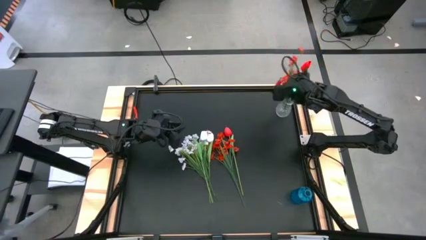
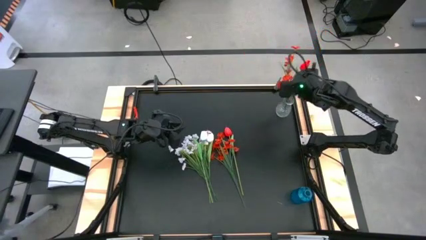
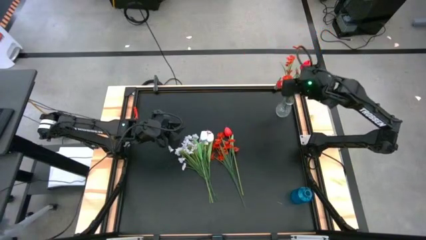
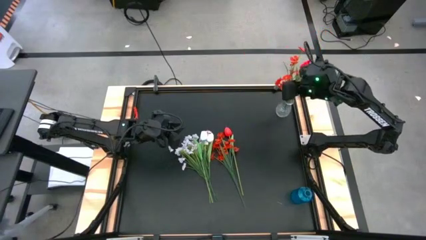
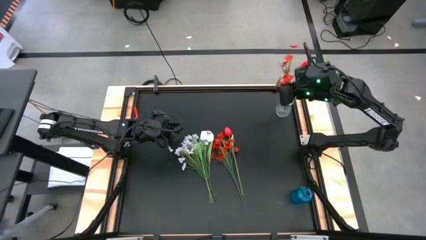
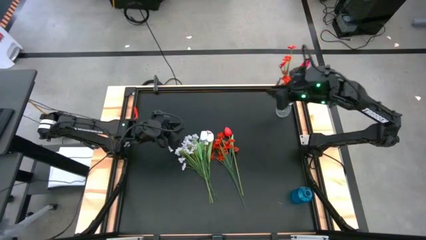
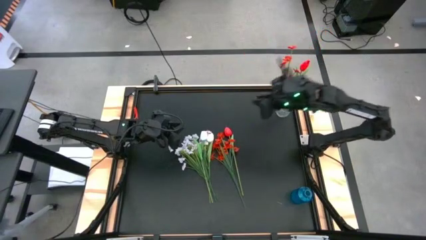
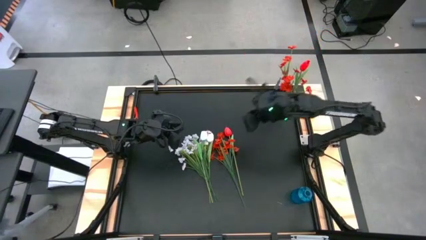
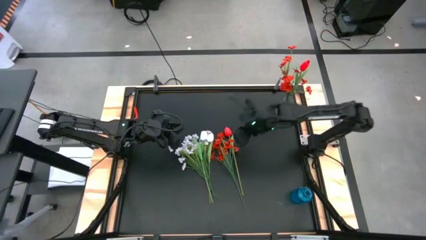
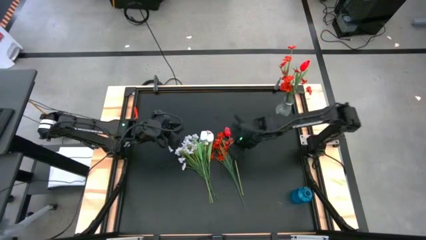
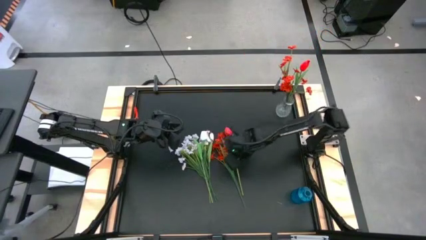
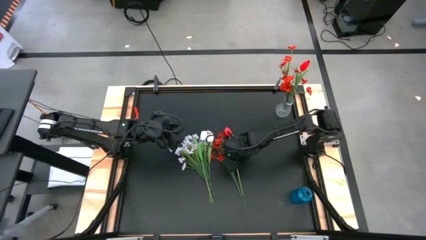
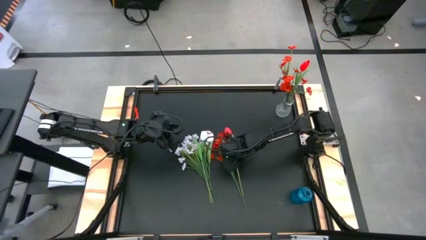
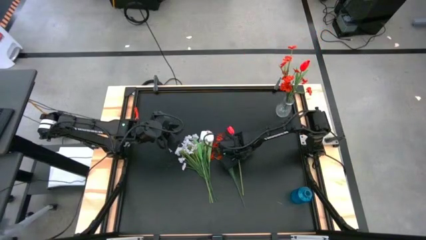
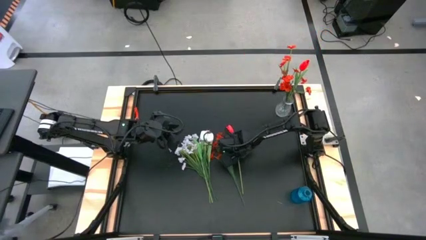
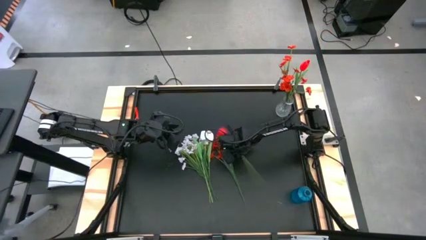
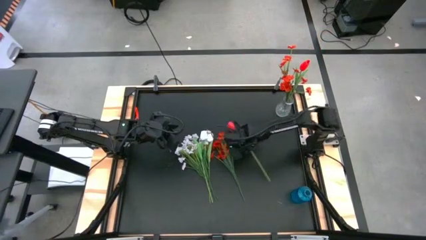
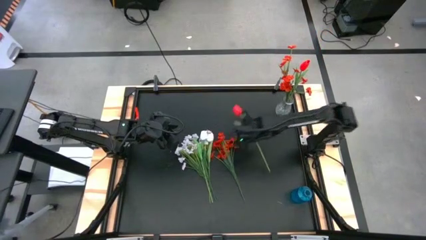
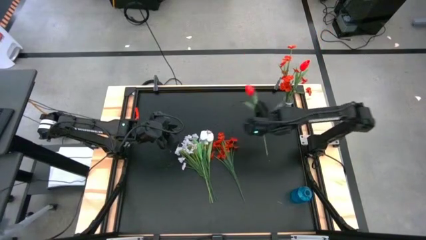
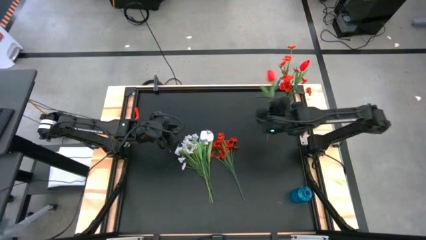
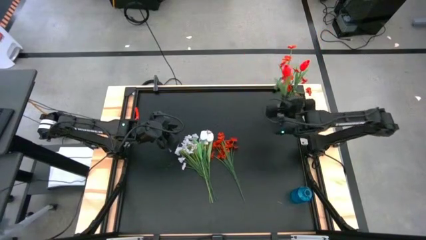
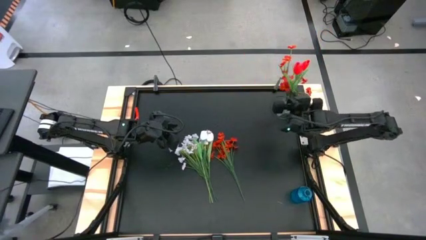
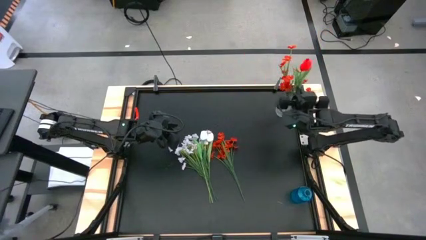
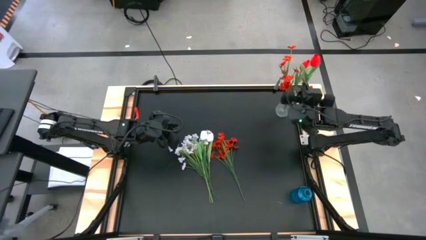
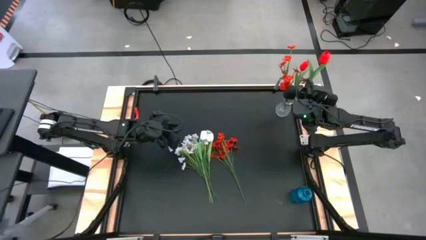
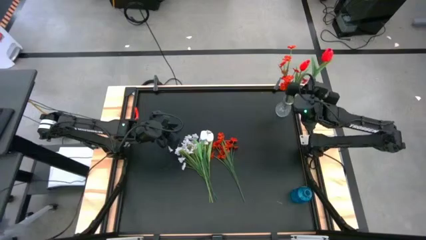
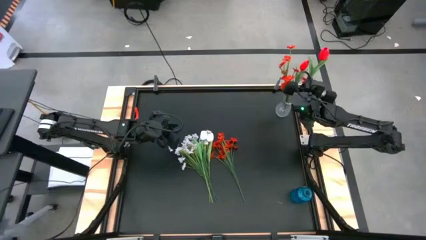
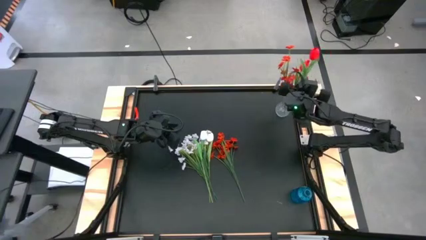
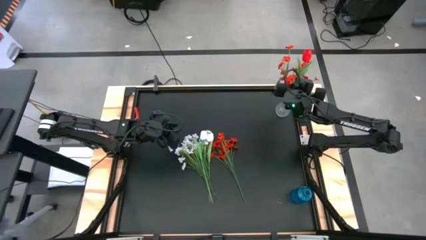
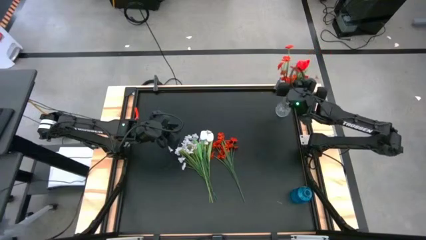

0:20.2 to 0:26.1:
Task: Sort flowers into vase by color
Put the red flower into the transparent vase

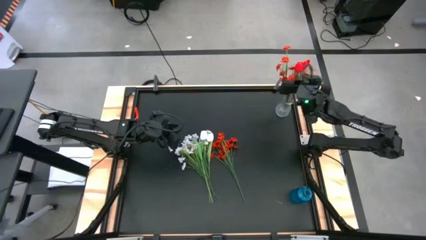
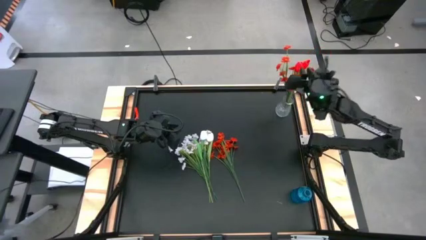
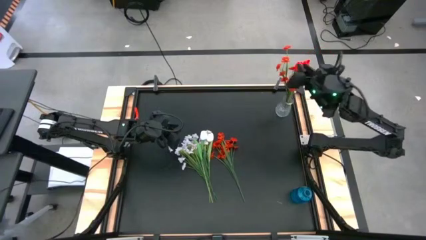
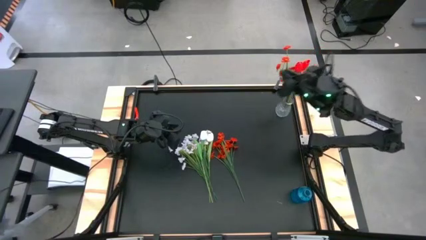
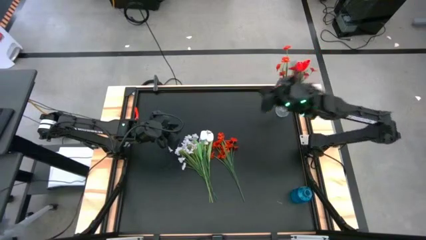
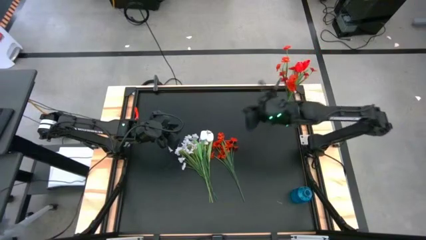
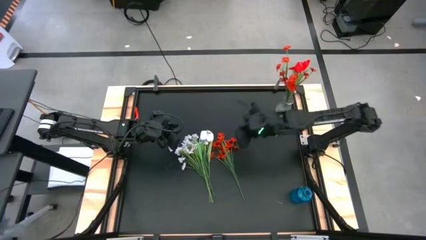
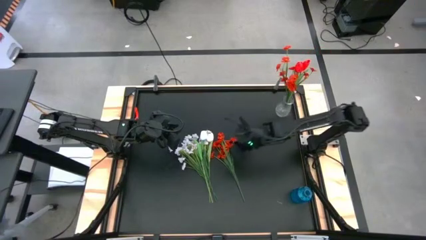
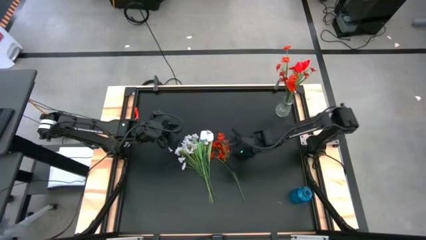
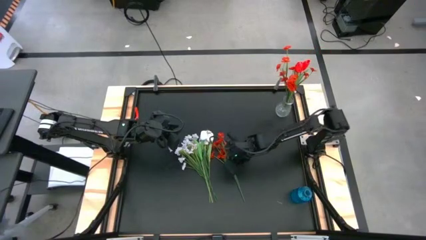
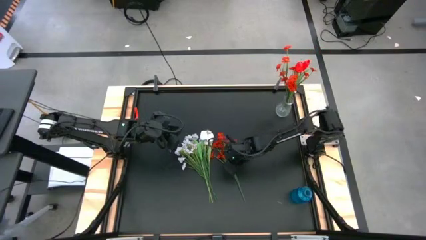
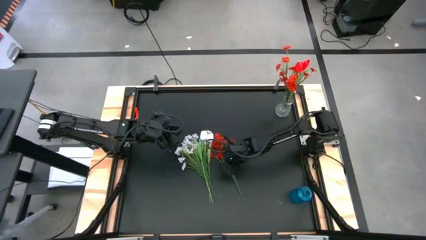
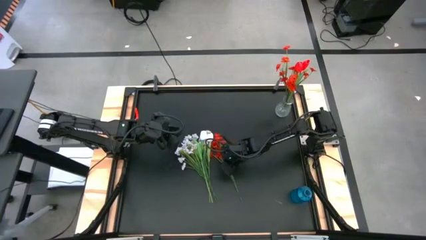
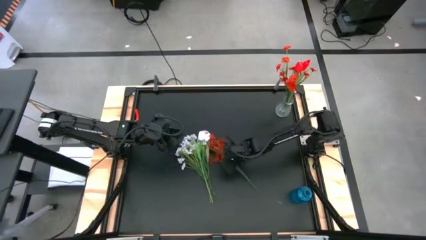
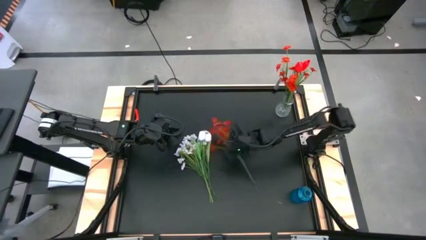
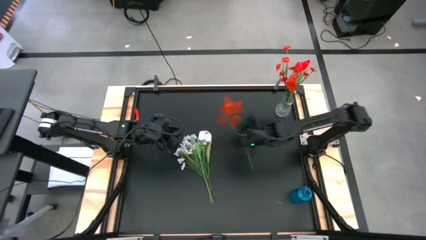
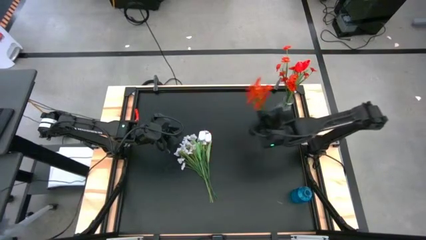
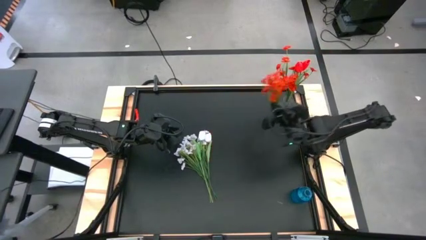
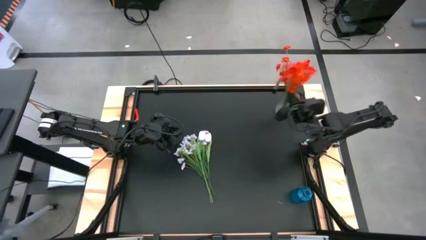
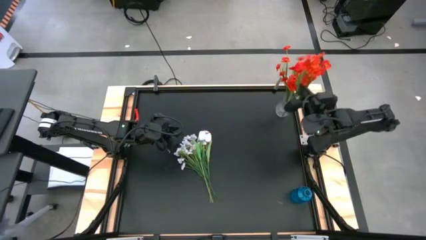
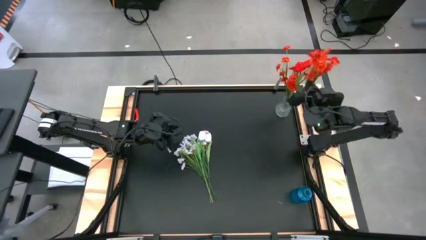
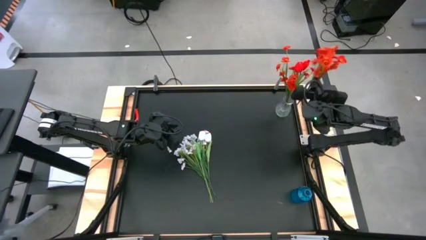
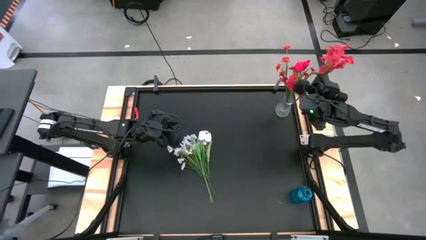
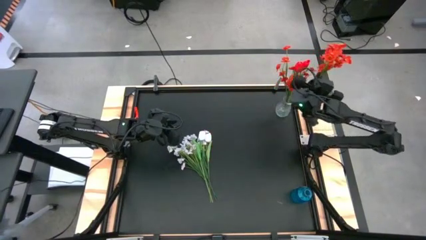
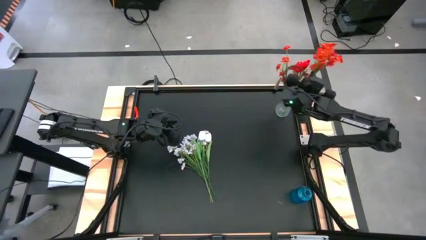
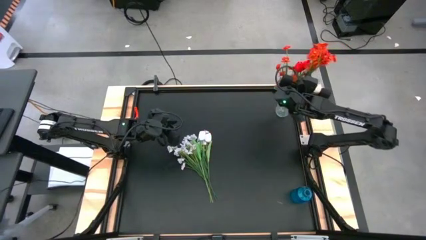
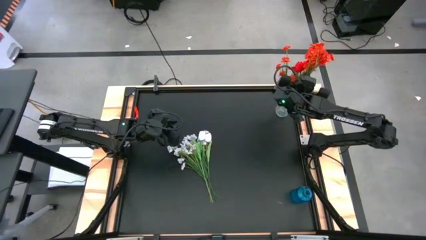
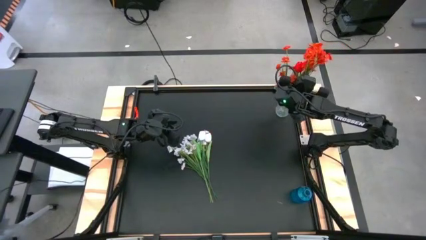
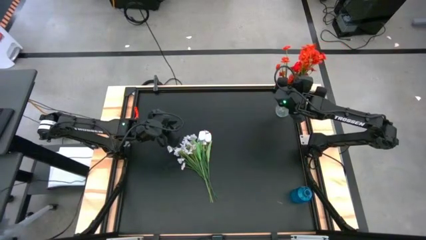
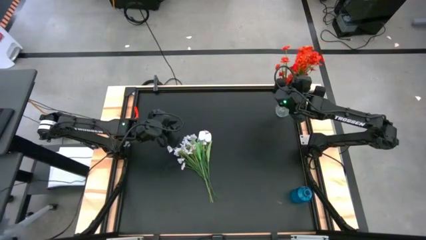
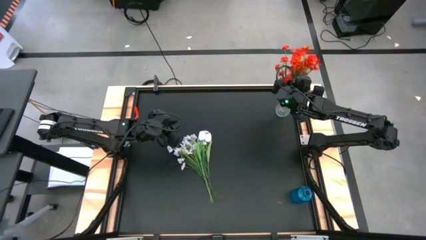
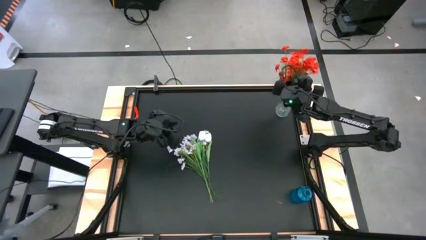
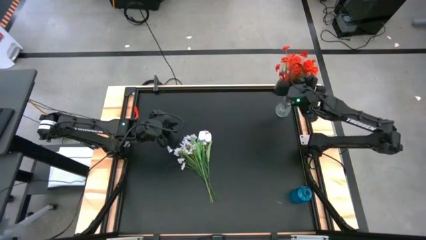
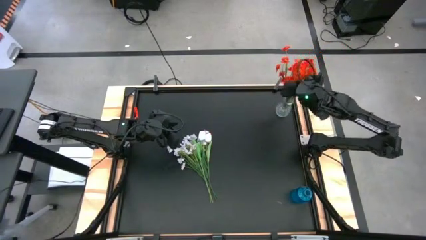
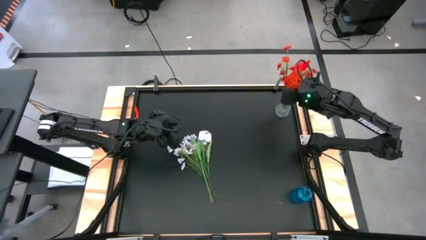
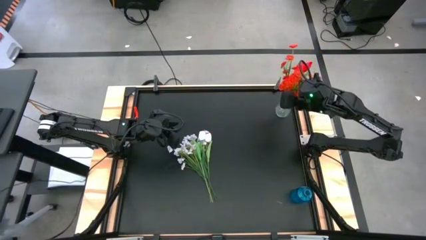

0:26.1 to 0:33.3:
Put the red flowers into the transparent vase

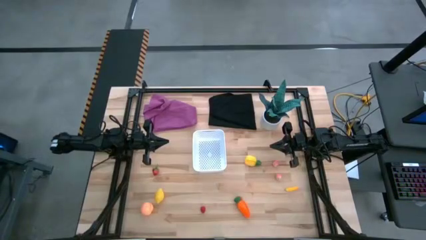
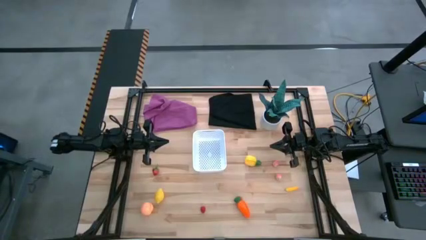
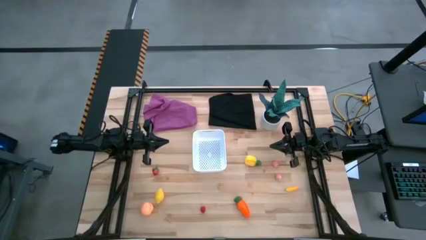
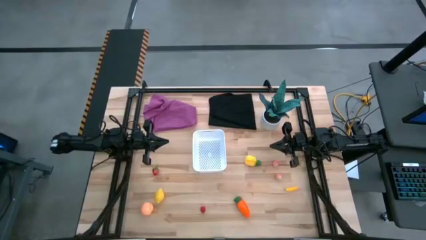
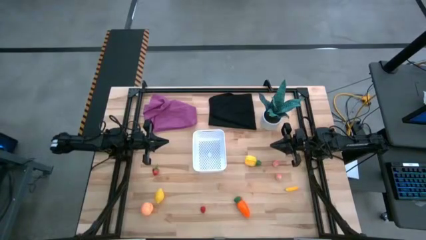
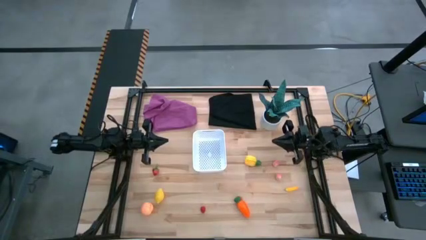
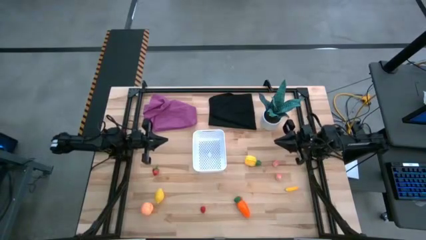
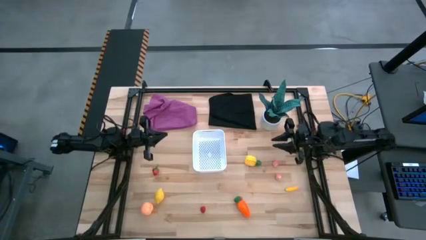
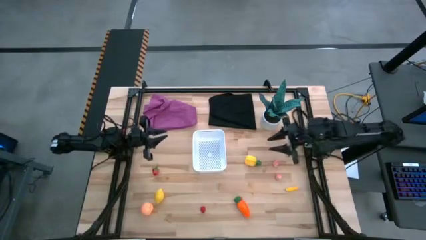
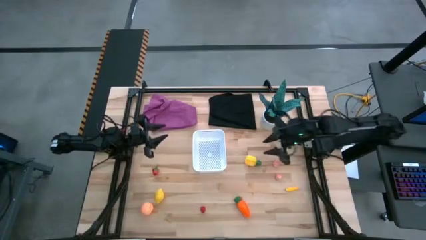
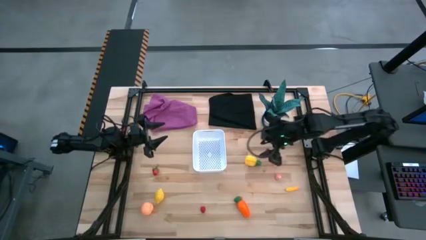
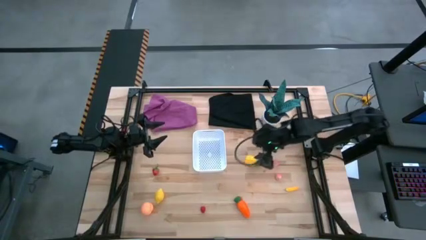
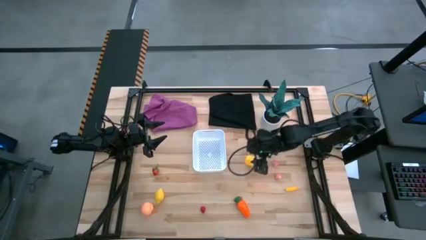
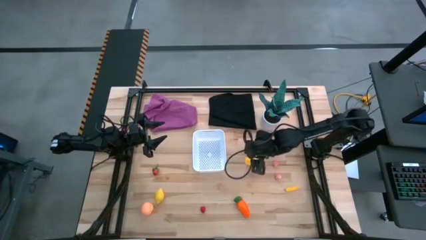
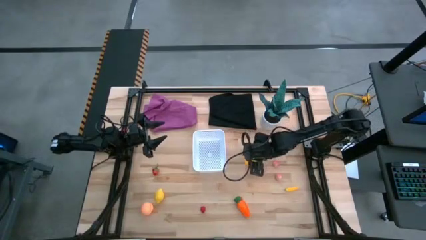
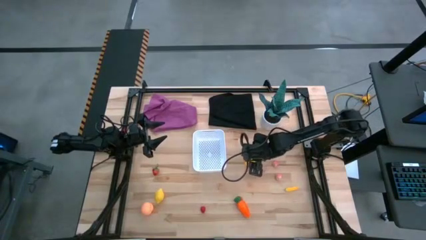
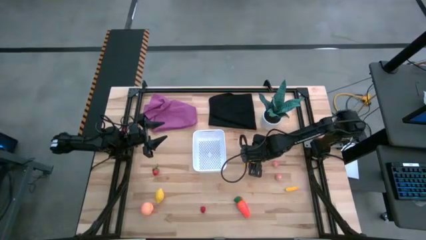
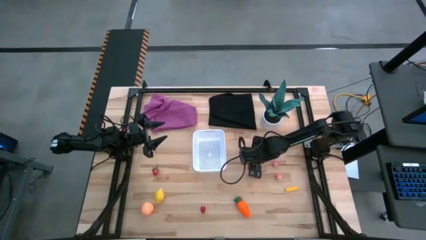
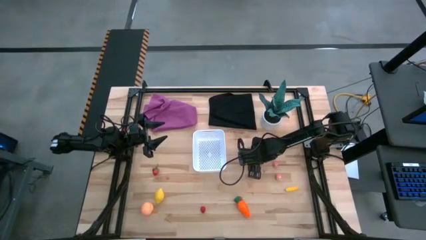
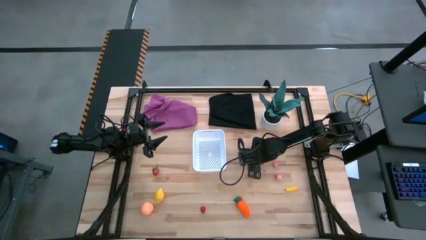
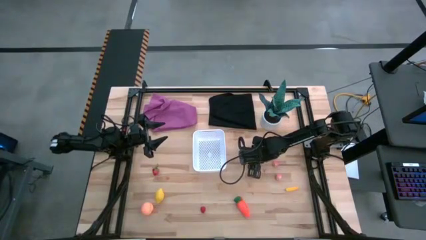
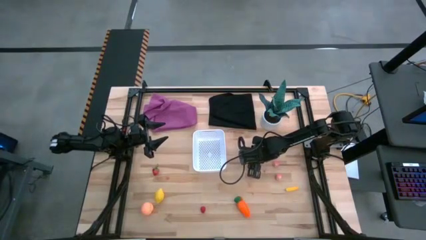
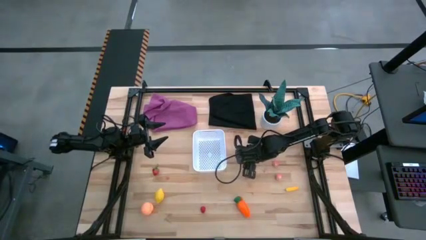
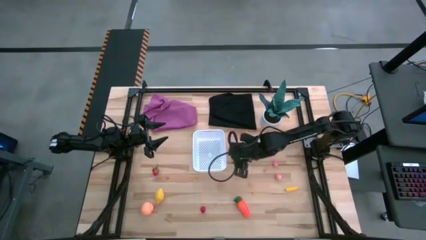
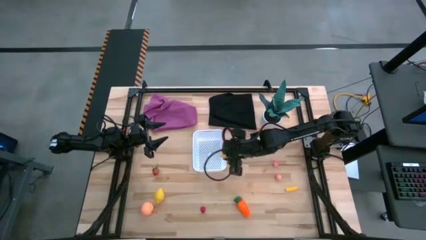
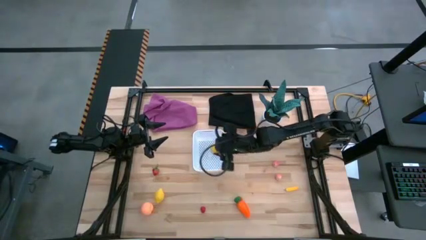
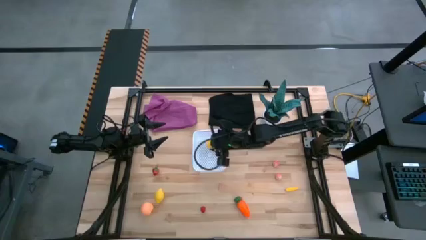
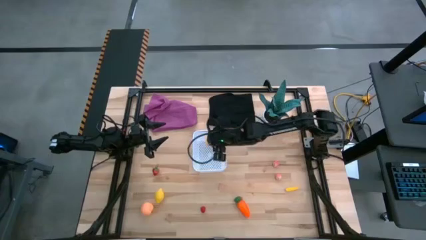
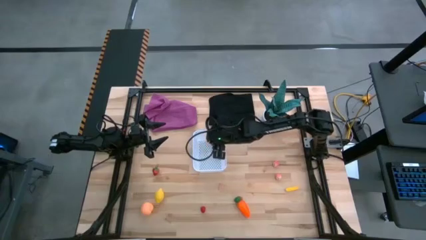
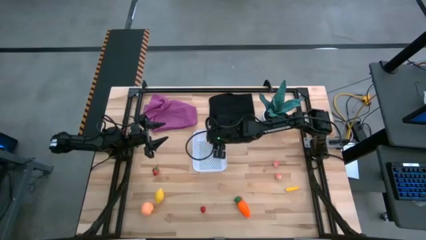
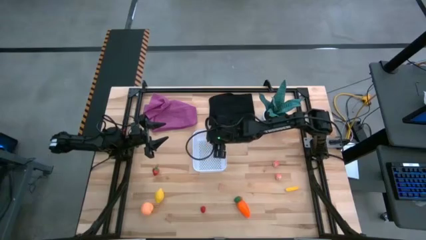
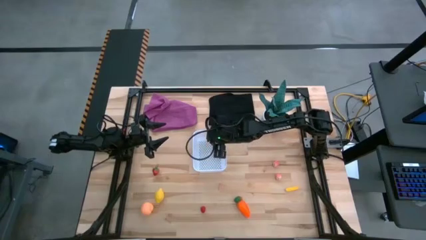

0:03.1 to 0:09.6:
Task: Pick and placing Produce into tupperware
Put the yellow pineapple into the white bin
